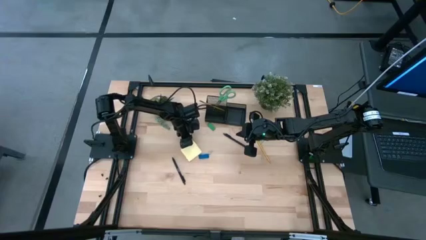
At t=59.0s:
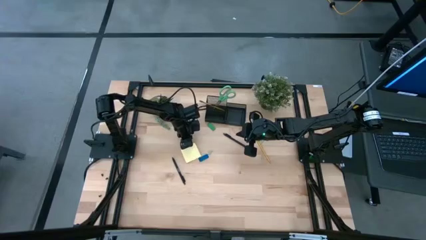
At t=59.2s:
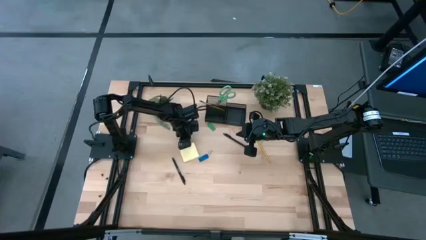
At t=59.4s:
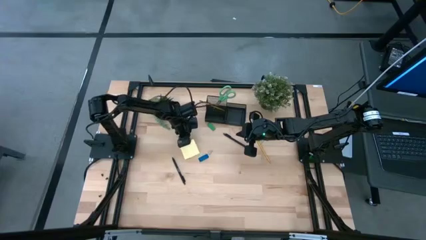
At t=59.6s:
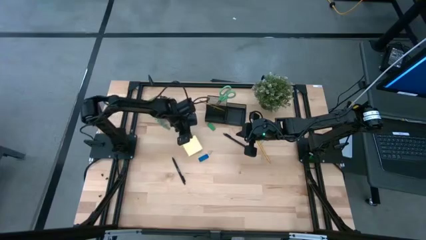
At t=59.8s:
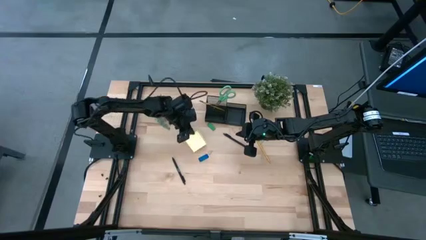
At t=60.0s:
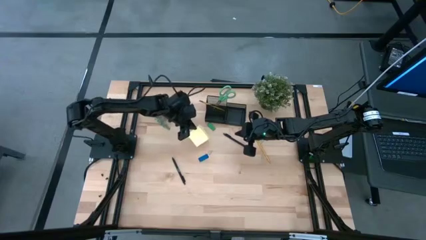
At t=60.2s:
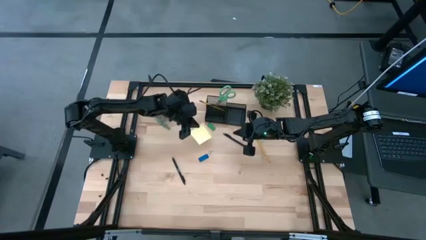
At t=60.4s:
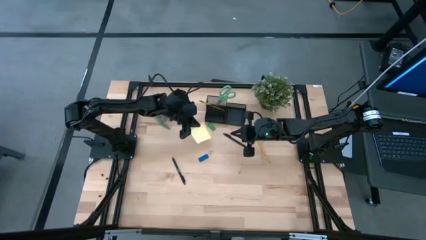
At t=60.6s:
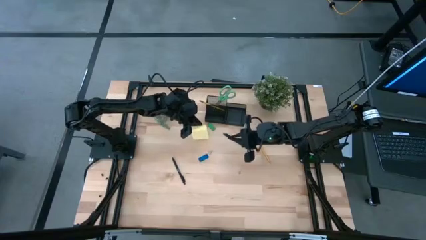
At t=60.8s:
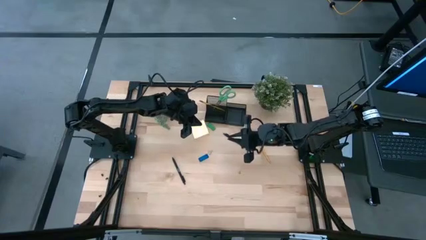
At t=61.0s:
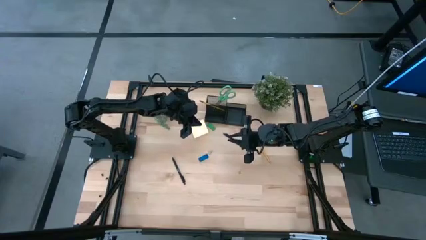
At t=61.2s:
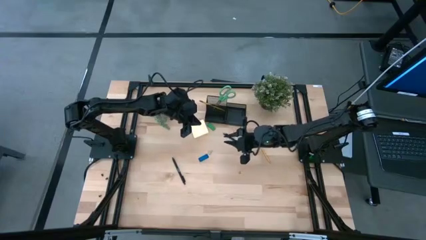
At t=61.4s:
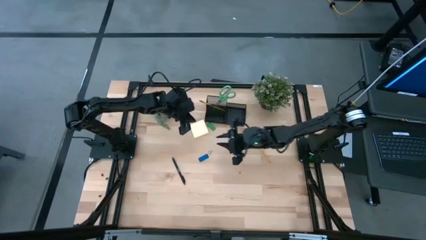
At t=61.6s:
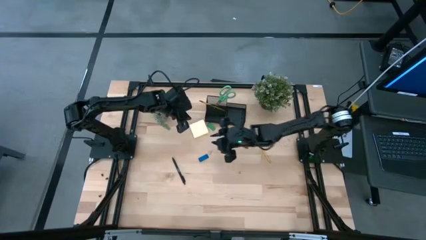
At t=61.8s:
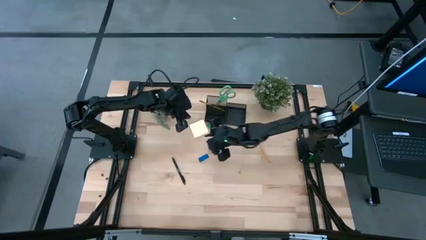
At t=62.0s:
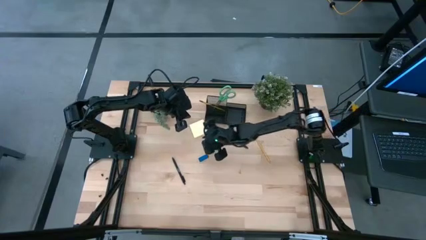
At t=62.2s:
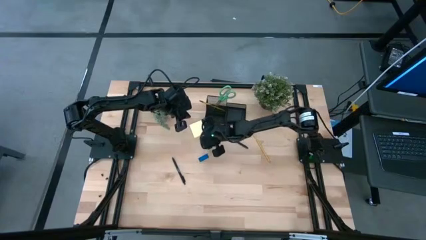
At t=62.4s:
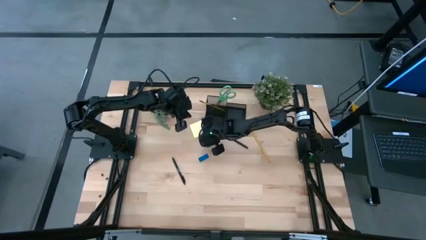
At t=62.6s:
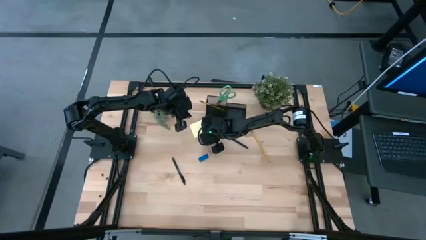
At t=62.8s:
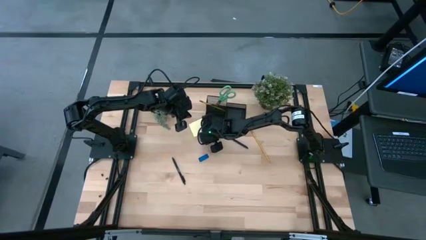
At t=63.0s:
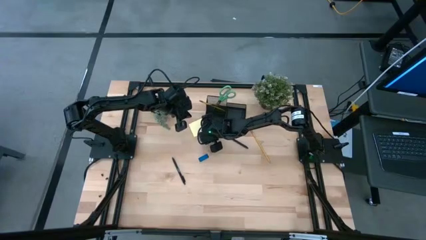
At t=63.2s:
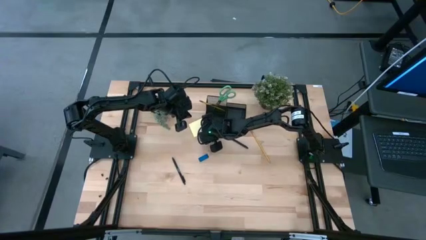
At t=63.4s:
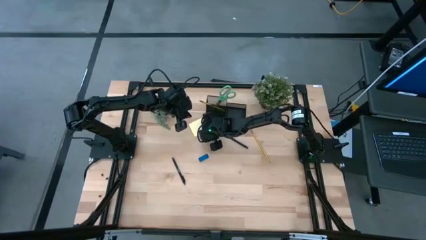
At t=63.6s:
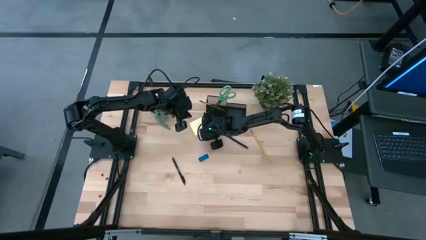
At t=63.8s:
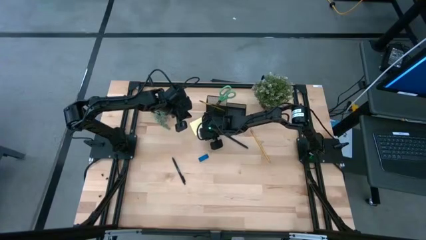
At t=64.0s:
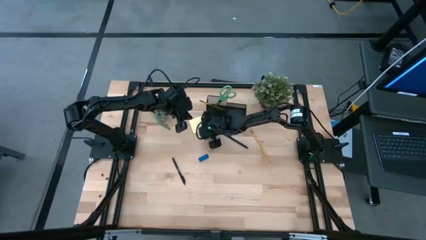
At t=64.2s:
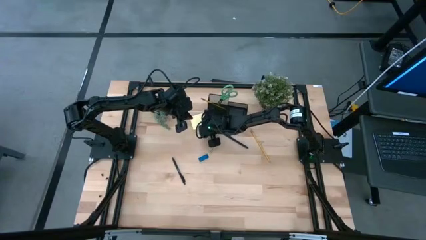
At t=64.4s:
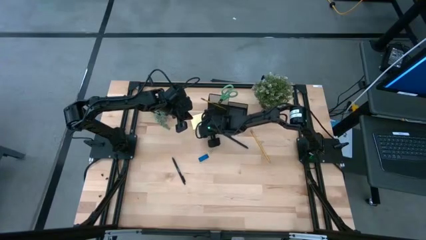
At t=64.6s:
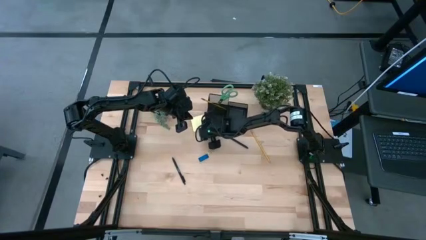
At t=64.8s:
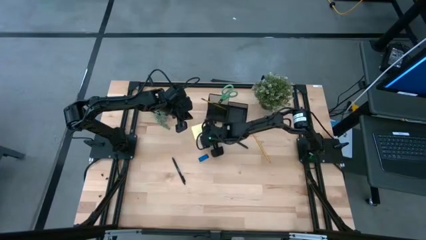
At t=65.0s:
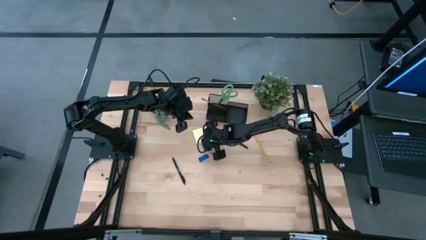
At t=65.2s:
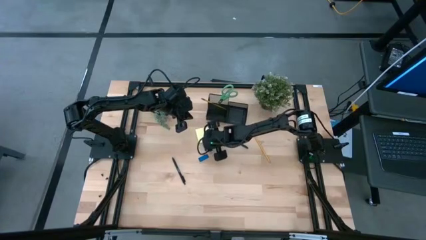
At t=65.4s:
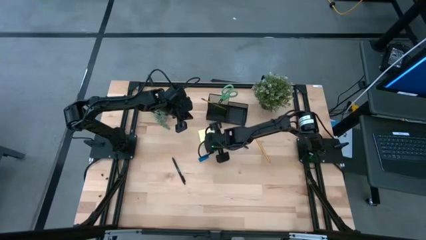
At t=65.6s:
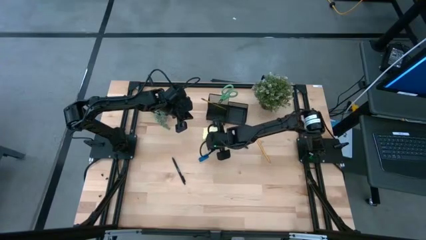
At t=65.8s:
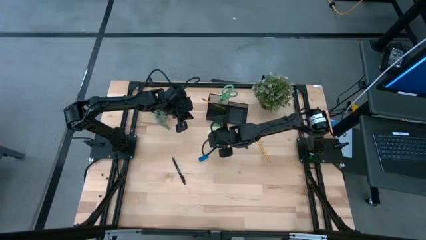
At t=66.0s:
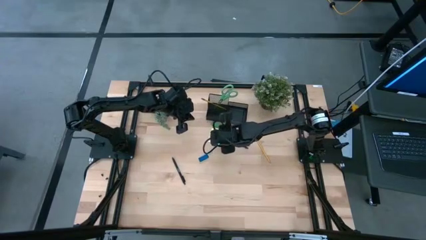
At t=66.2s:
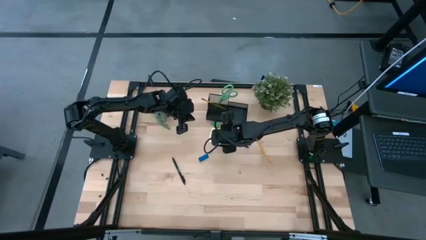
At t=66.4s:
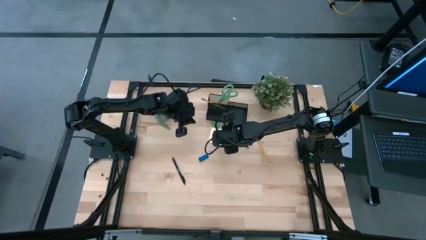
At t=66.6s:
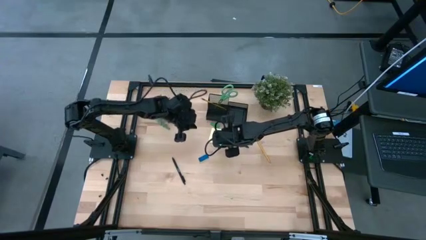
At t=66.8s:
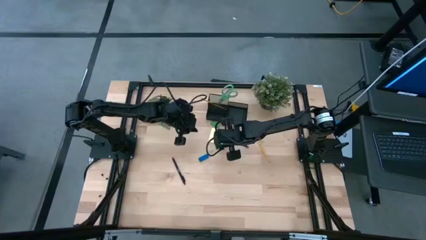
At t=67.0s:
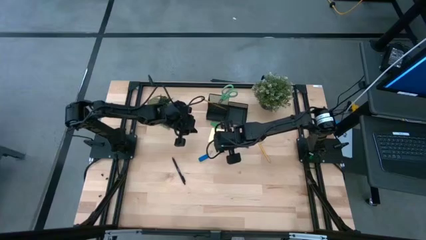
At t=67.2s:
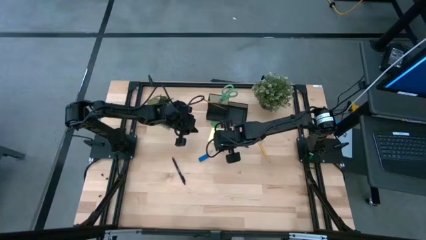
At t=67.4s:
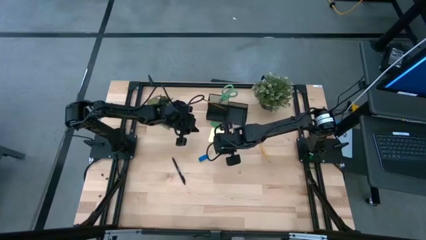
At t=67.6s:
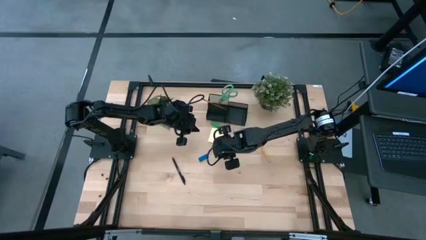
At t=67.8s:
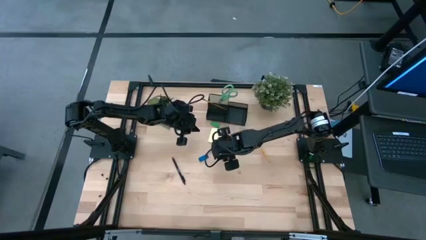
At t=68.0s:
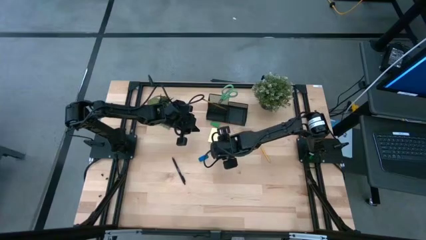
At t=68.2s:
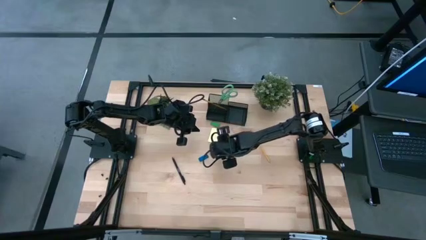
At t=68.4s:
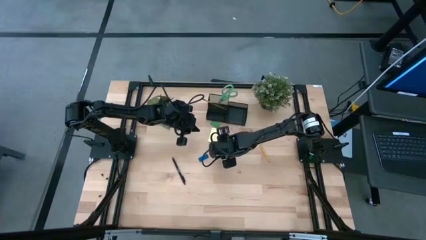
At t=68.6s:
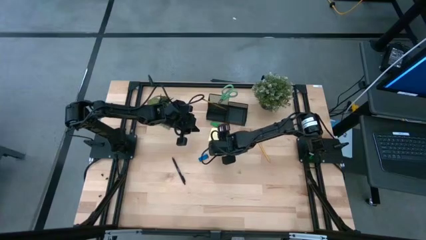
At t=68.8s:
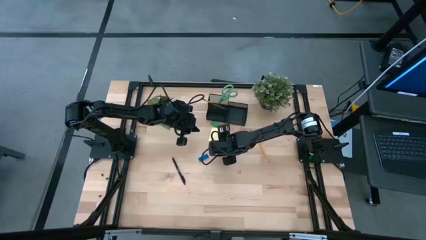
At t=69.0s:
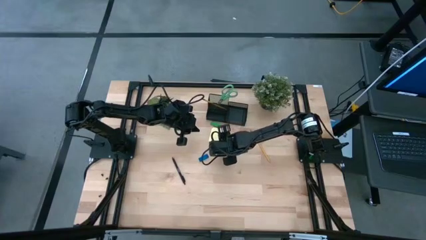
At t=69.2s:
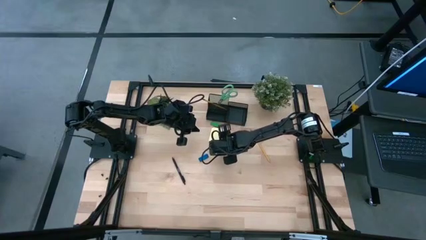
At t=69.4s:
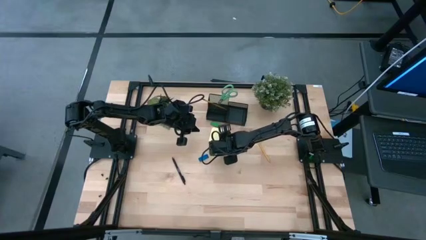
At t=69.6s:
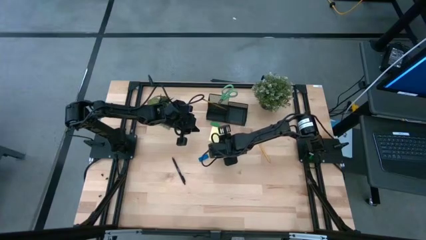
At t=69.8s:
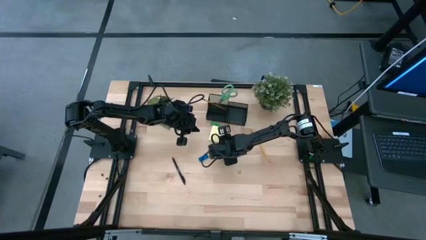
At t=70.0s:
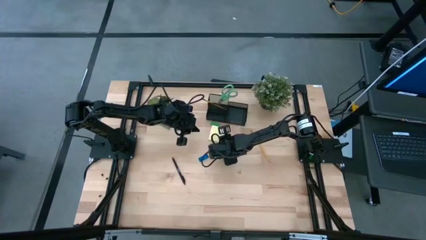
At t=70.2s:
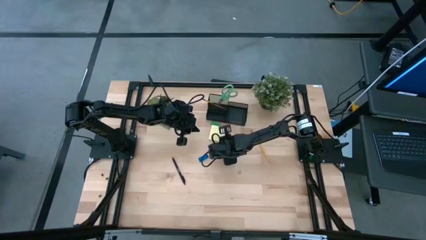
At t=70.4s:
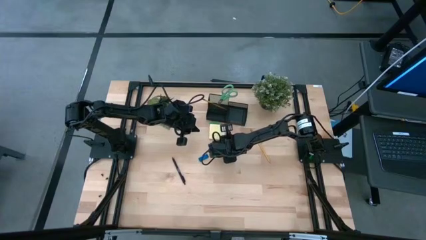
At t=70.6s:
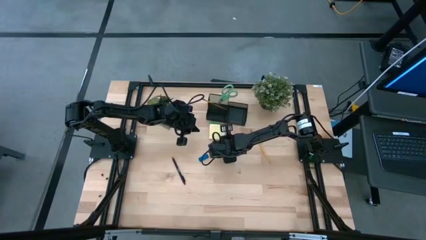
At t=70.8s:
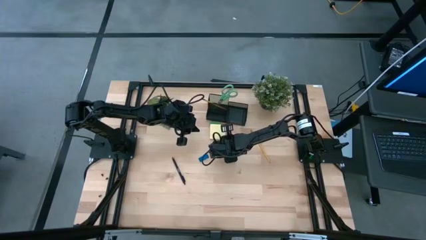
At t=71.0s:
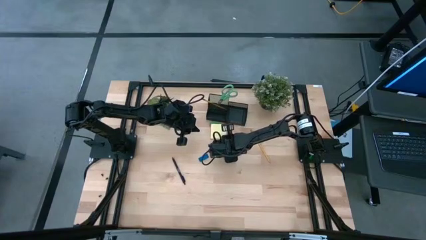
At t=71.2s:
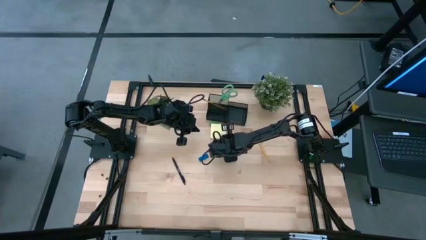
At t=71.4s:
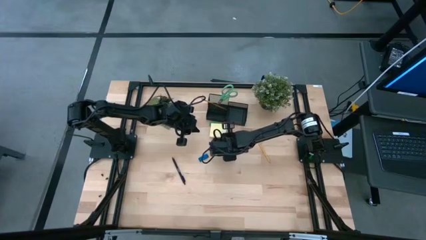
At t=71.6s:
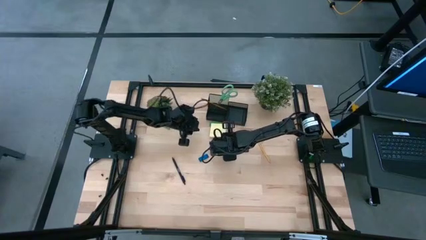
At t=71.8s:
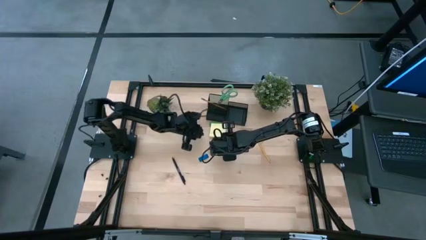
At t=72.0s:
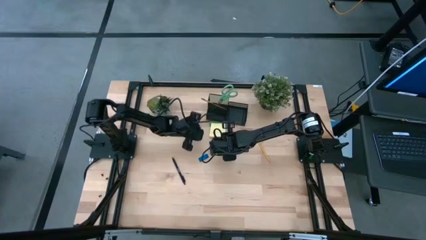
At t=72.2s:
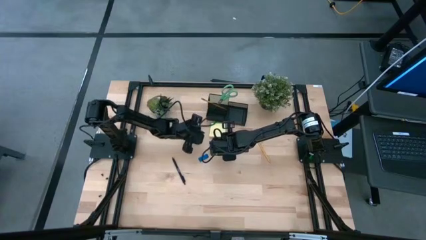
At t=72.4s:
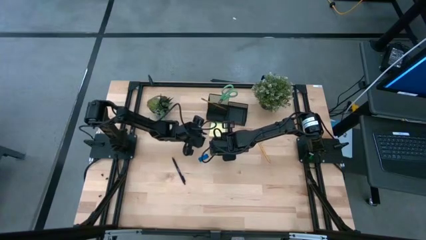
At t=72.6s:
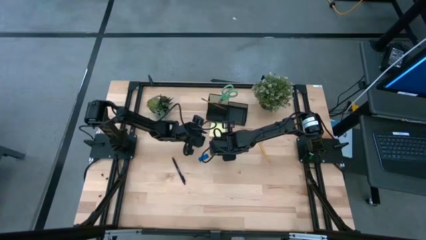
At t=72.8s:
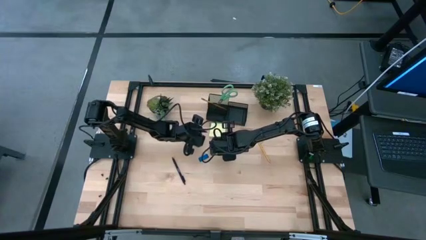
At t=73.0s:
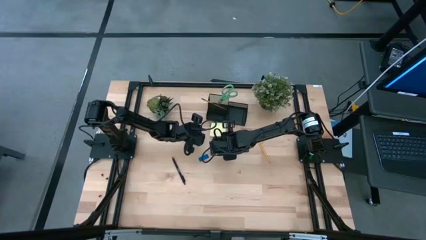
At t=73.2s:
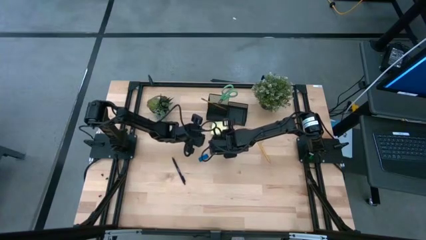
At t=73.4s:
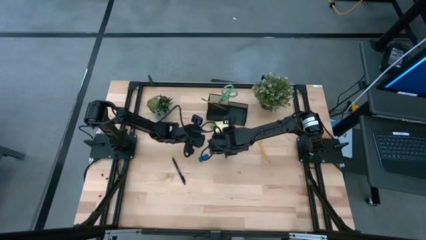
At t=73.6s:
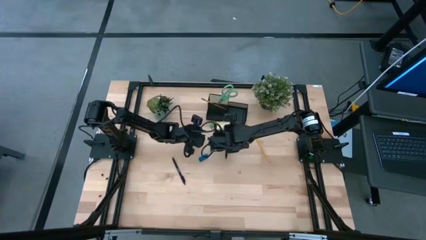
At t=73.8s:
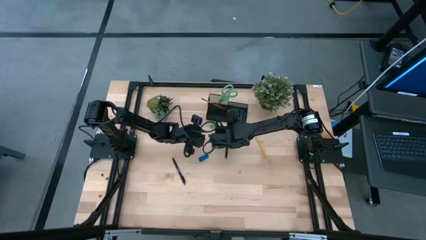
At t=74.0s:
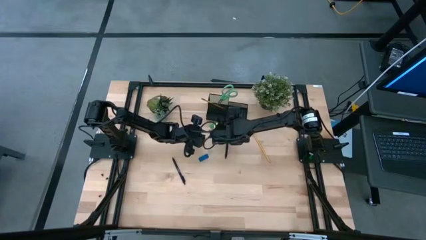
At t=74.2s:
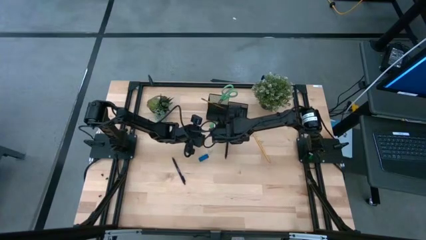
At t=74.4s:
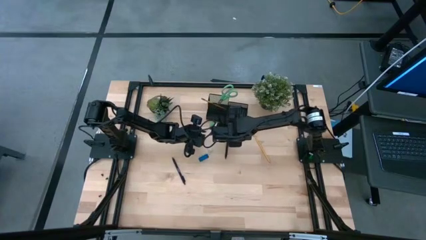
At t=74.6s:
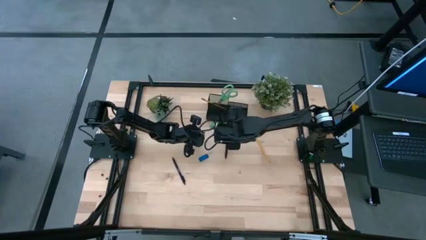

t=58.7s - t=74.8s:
Task: Pick and place office supplies into organizer
Put the yellow sticky notes into the black desk organizer
